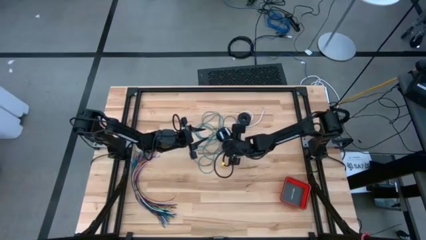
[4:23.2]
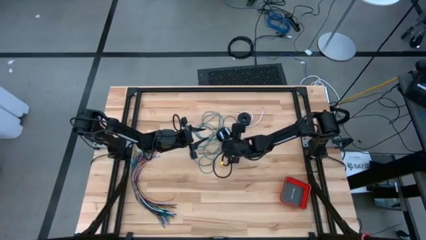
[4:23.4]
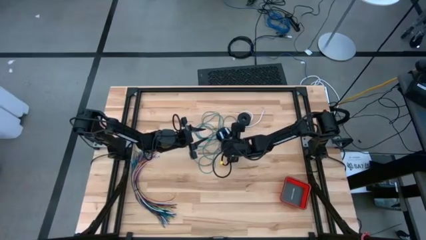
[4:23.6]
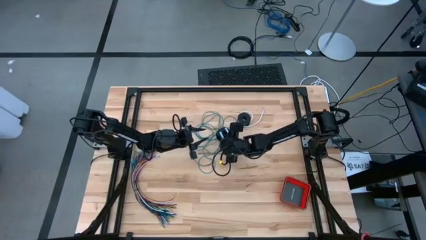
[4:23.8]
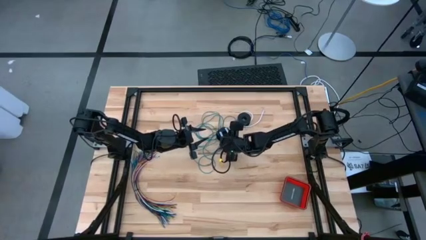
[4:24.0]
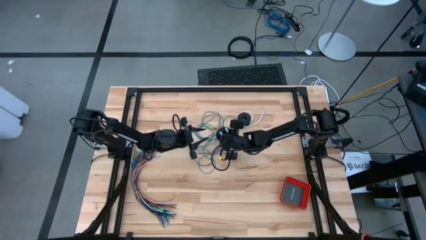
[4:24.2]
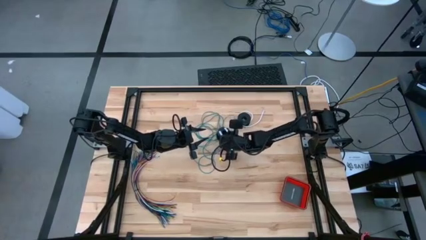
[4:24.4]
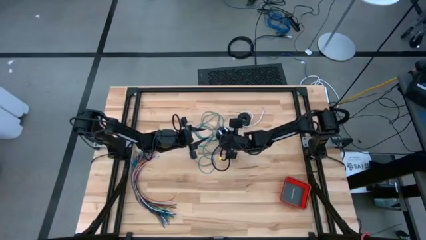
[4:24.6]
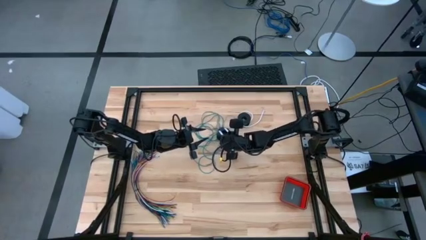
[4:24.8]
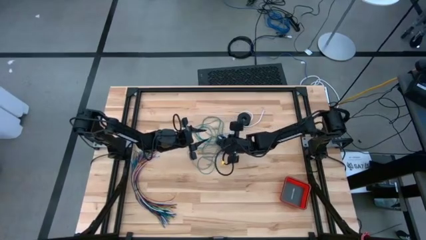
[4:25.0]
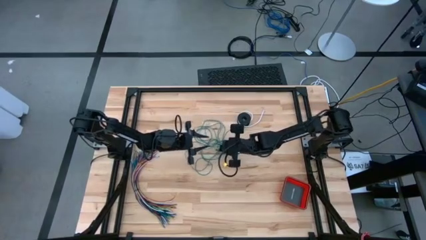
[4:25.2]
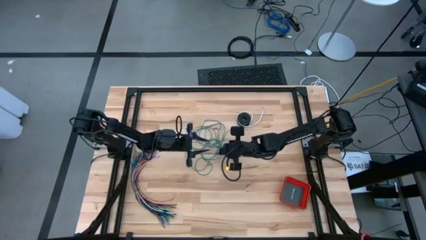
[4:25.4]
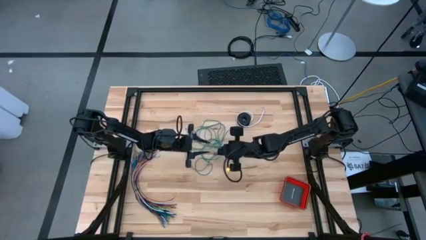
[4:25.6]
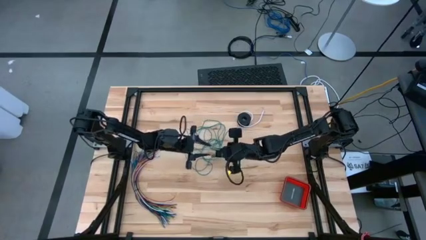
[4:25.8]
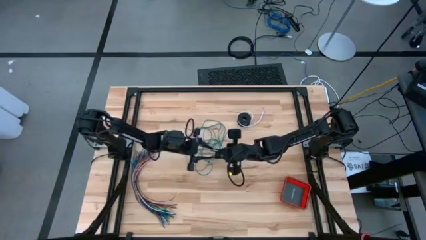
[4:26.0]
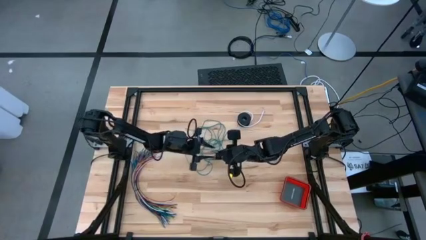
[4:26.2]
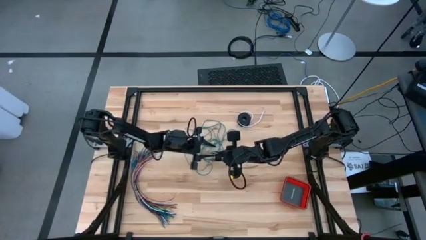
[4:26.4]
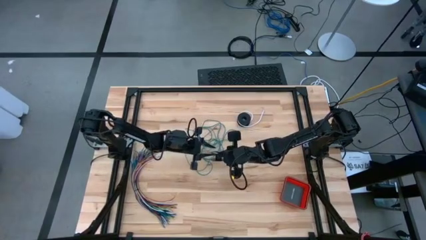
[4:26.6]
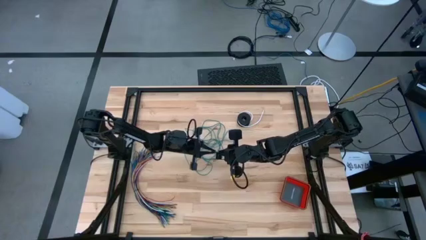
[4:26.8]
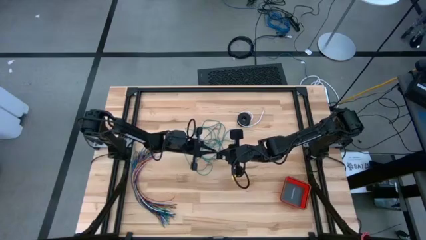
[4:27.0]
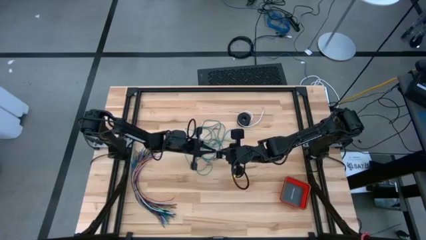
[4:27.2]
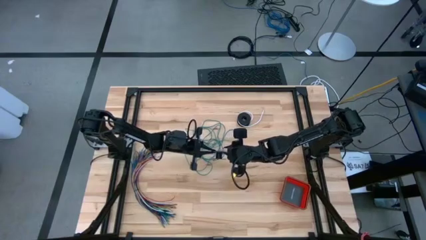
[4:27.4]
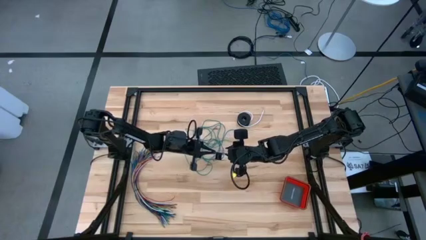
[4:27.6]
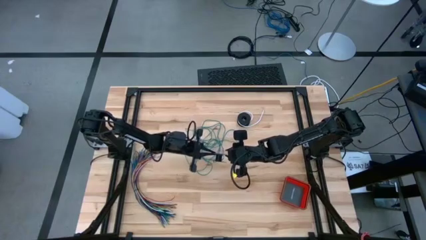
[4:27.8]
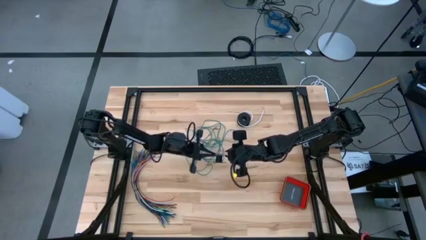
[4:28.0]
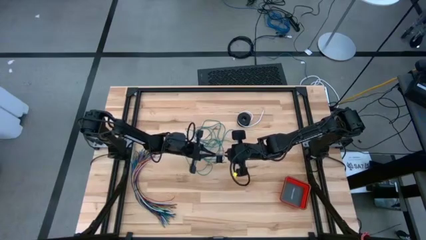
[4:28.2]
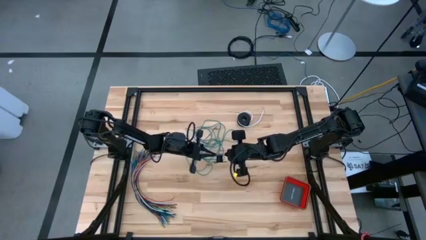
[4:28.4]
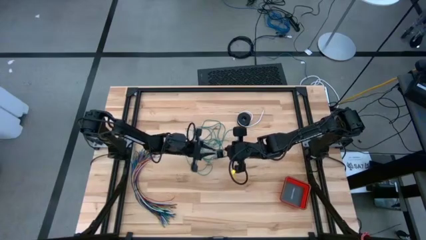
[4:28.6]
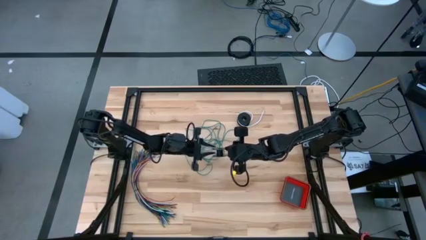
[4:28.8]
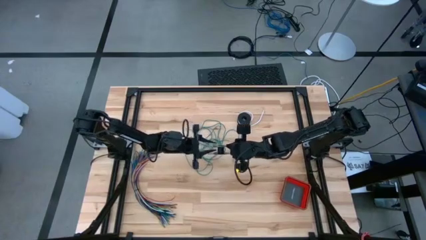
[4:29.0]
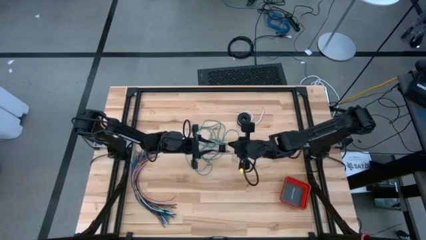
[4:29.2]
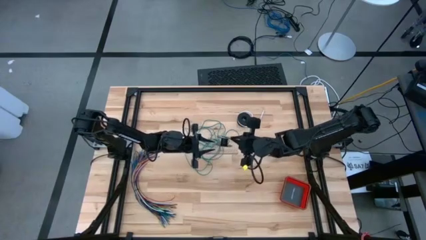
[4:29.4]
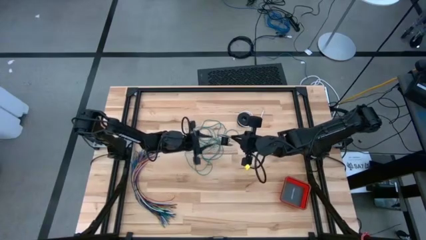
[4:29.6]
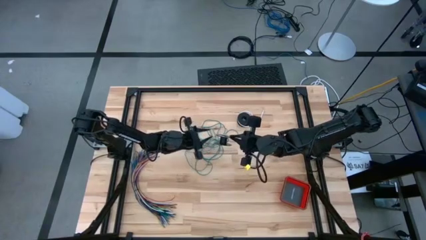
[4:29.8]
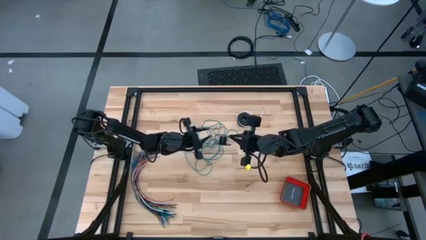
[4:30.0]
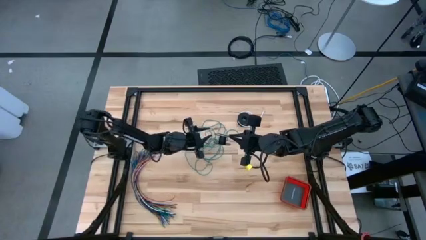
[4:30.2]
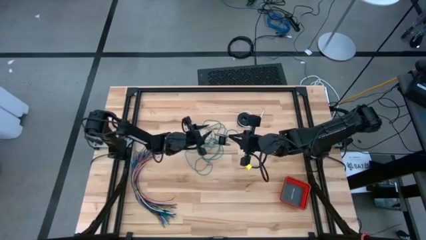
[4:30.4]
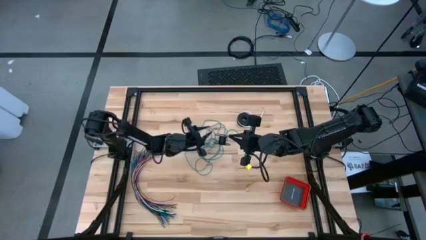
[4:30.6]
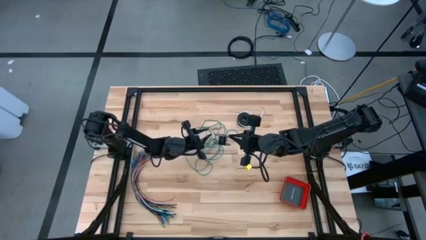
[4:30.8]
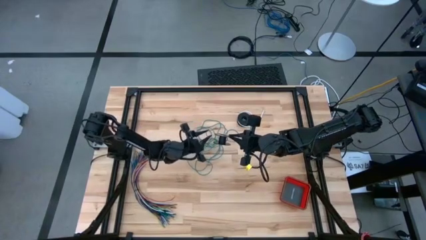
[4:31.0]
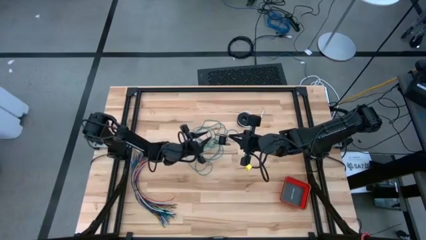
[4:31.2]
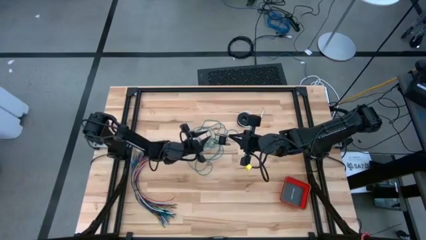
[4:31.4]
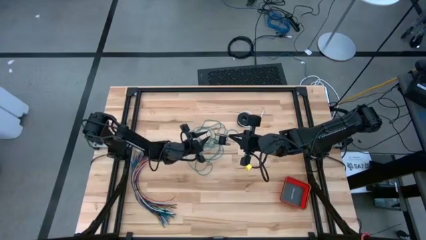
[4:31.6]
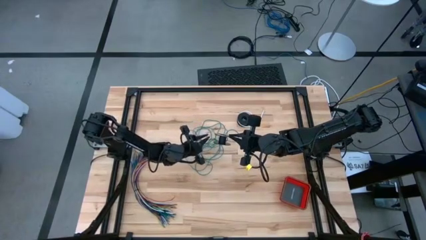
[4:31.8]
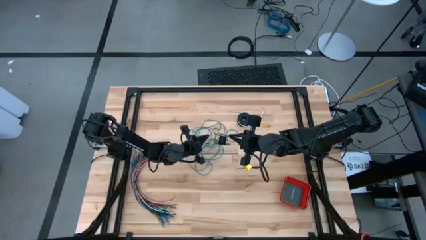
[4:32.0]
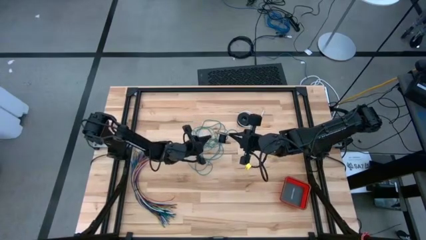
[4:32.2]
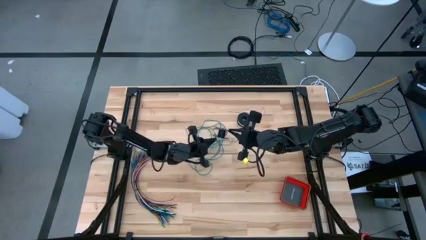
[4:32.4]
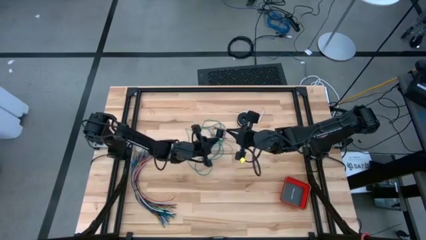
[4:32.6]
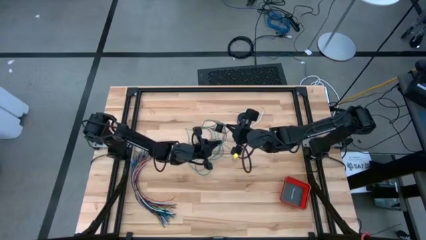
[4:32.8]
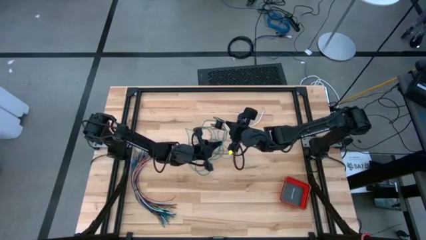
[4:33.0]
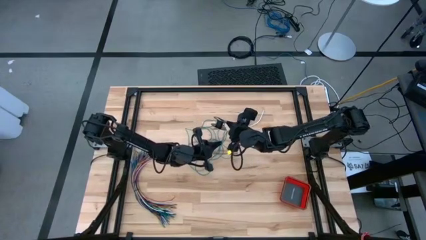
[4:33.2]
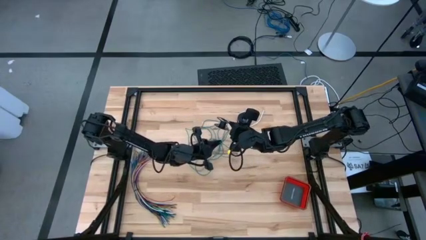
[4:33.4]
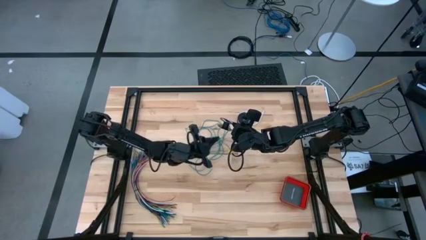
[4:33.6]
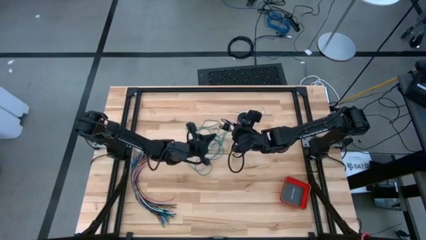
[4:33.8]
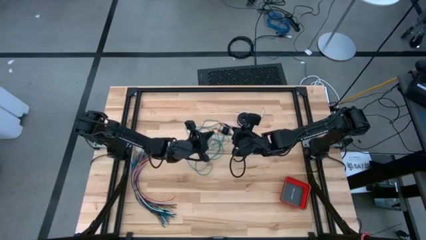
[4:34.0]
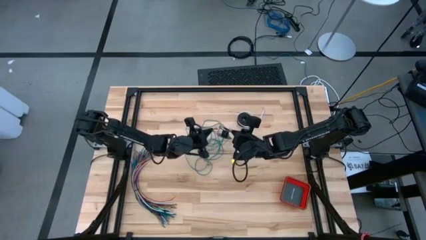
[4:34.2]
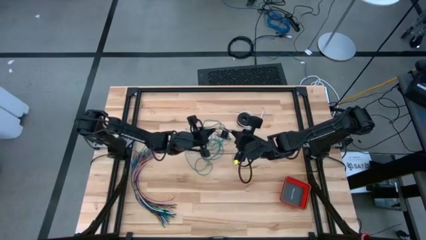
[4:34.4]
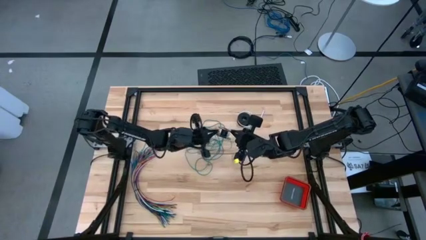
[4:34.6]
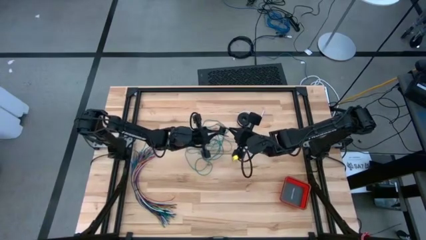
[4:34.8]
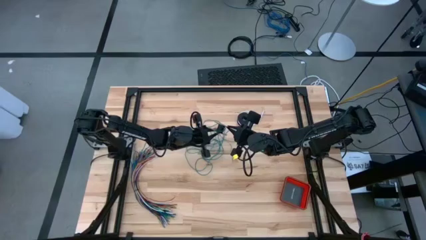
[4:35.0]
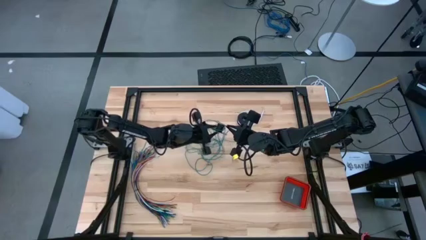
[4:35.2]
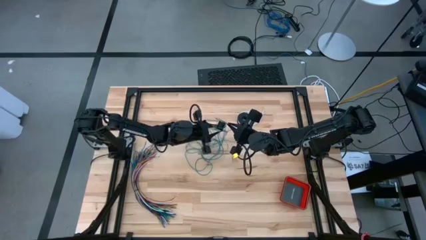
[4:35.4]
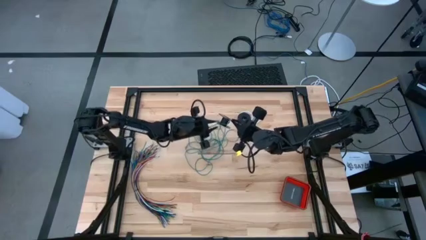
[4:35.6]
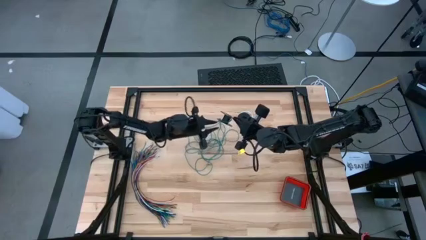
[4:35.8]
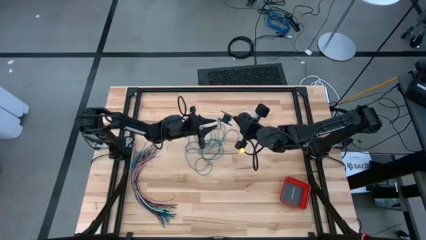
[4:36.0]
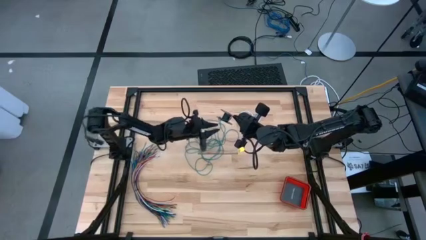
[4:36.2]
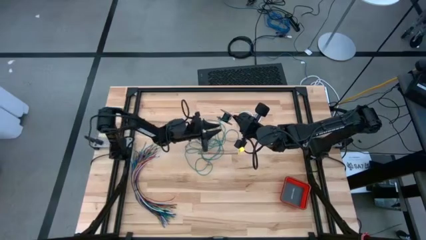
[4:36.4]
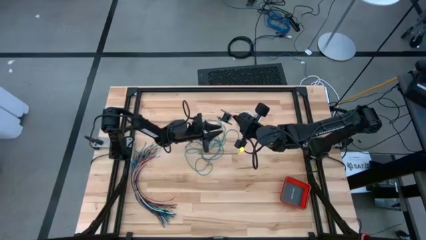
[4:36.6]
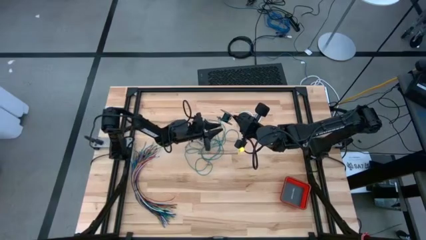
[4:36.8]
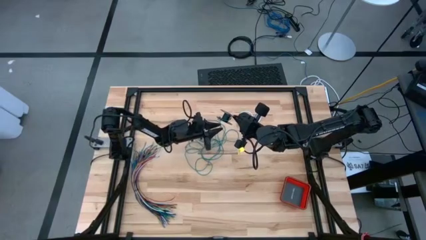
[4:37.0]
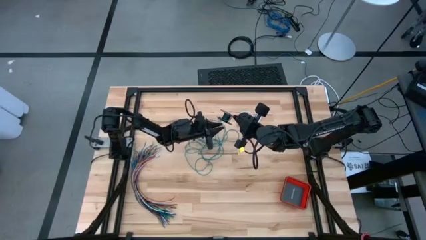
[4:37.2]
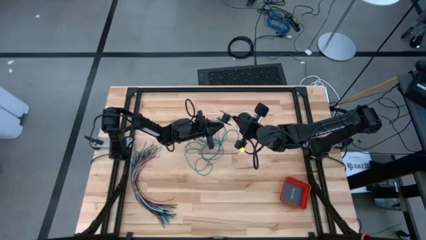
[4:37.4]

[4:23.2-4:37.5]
Task: Coil cords
Coil the green wire onto the spool

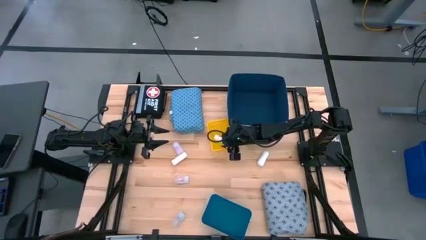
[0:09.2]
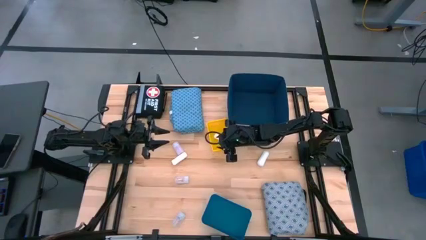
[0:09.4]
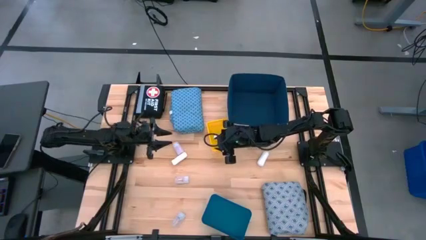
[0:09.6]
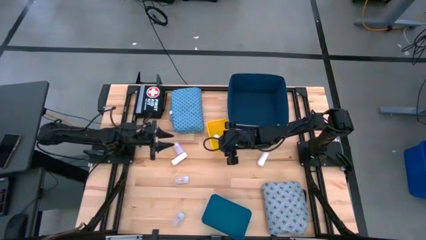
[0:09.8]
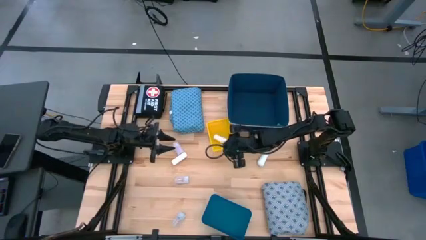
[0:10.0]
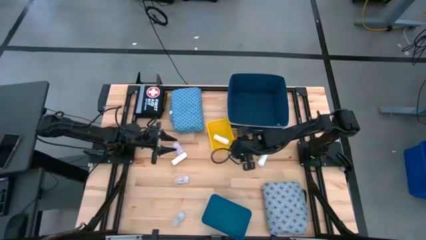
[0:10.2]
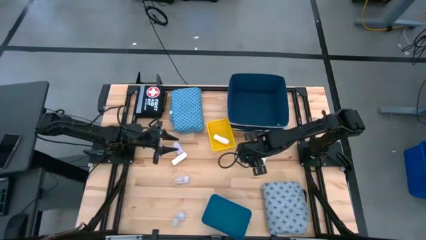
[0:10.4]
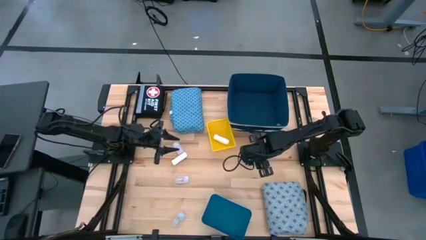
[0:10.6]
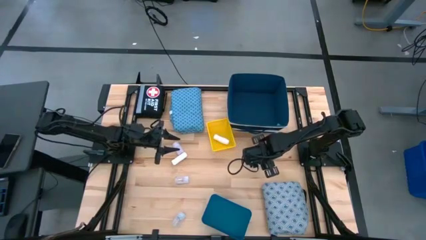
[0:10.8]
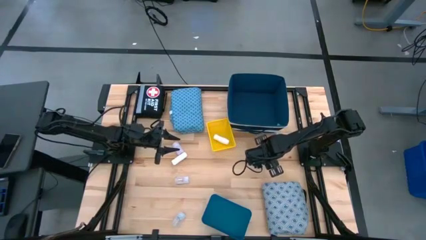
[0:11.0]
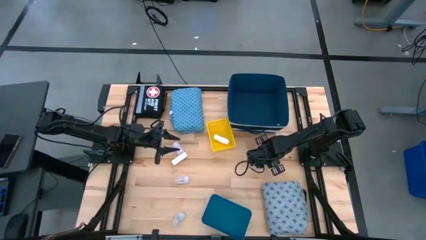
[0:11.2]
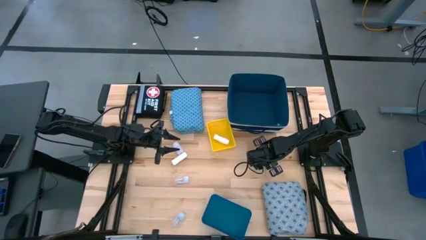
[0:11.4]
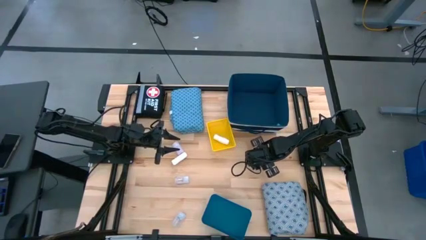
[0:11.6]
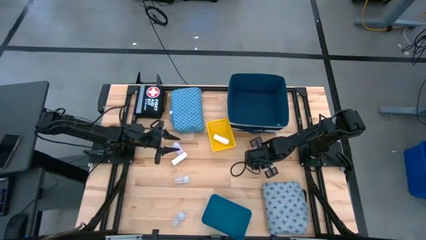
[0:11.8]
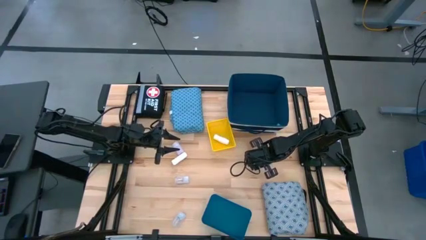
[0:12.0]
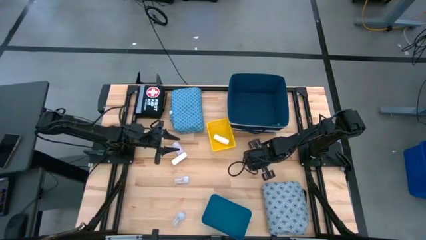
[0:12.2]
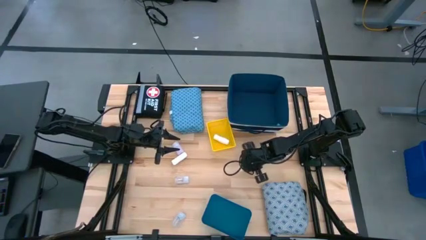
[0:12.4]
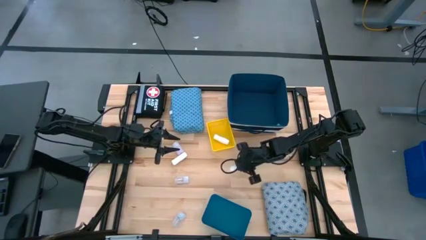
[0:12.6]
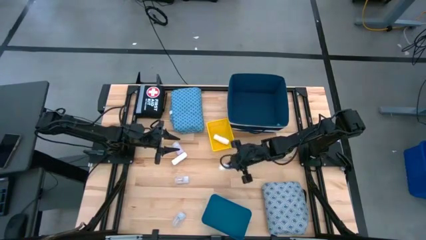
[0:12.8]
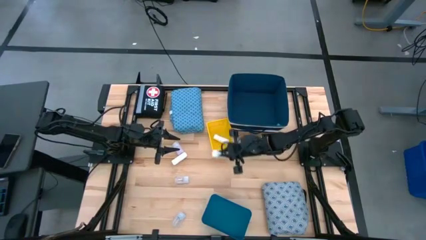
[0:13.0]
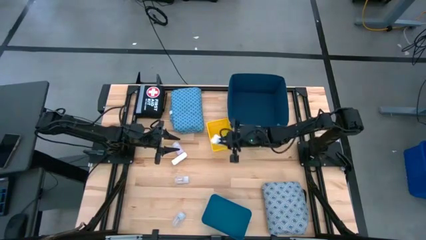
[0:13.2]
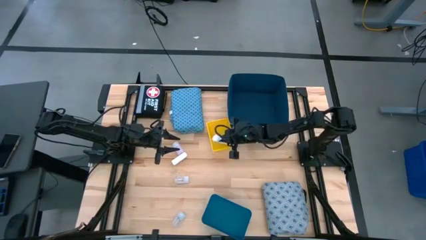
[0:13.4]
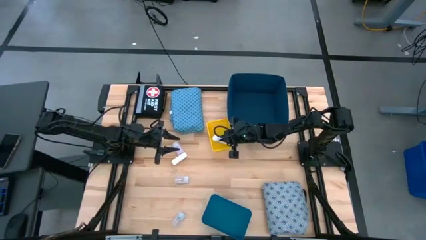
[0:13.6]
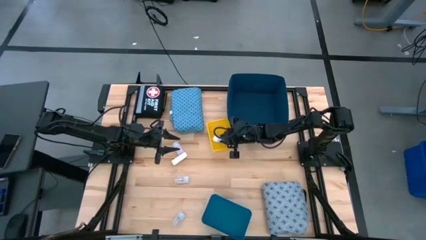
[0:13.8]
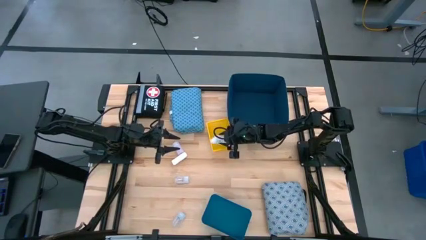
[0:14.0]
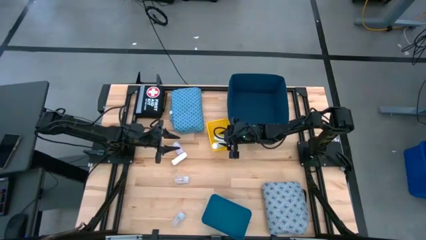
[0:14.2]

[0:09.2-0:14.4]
Task: Pick & place medical supplies in basket/bin
Put the right white bandage into the yellow basket
